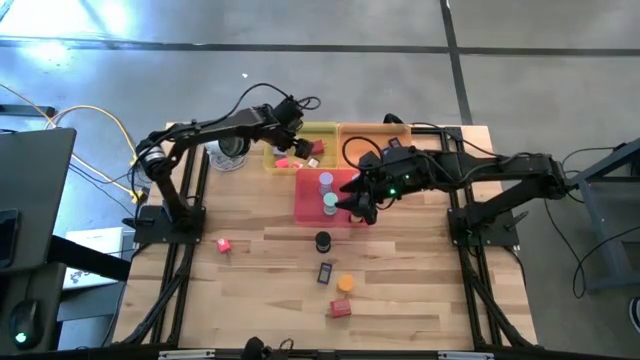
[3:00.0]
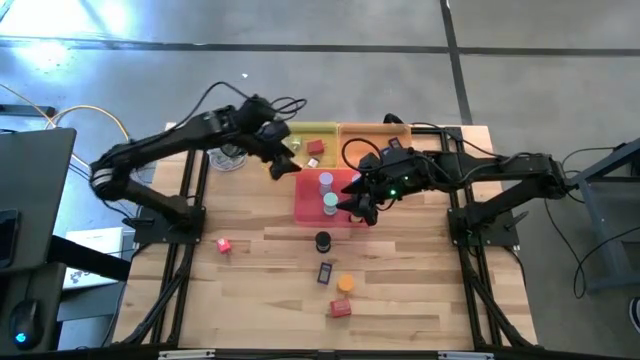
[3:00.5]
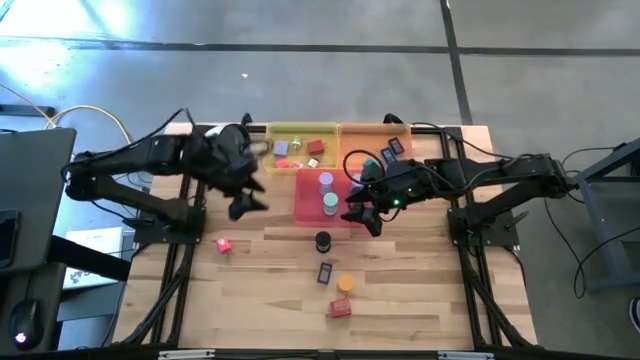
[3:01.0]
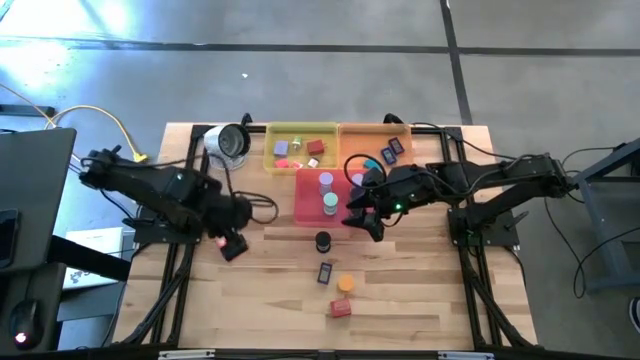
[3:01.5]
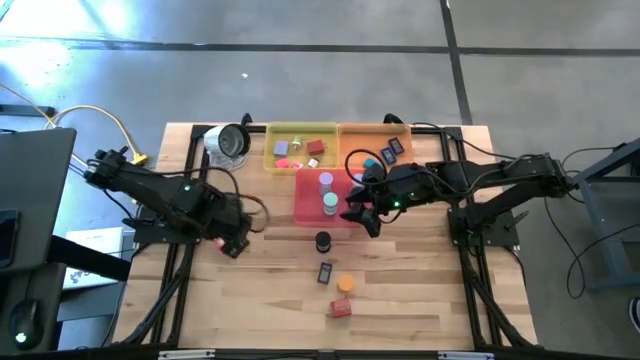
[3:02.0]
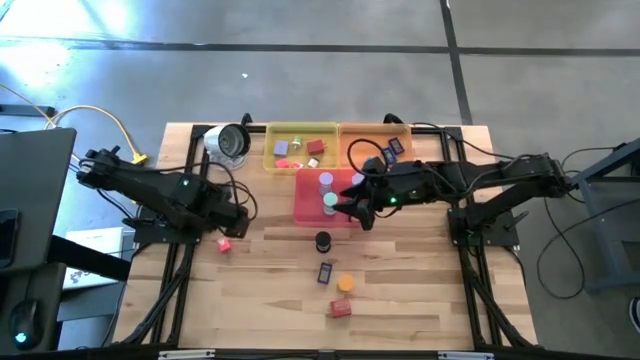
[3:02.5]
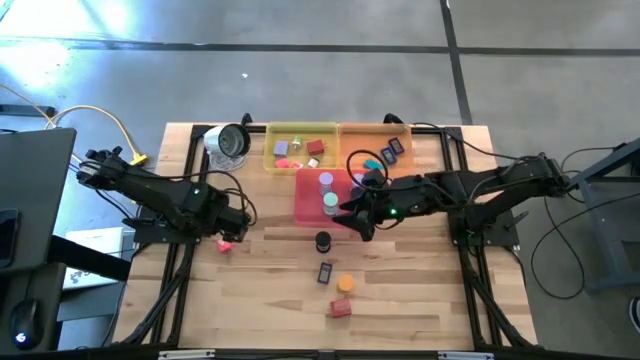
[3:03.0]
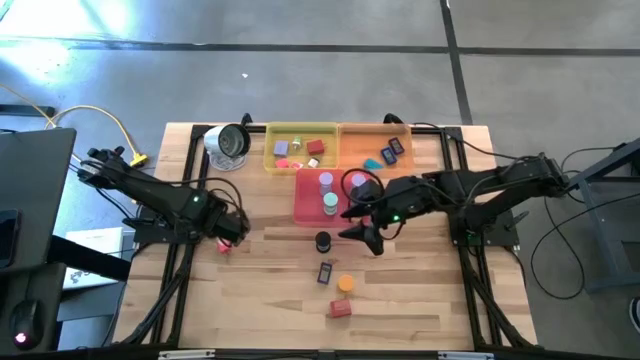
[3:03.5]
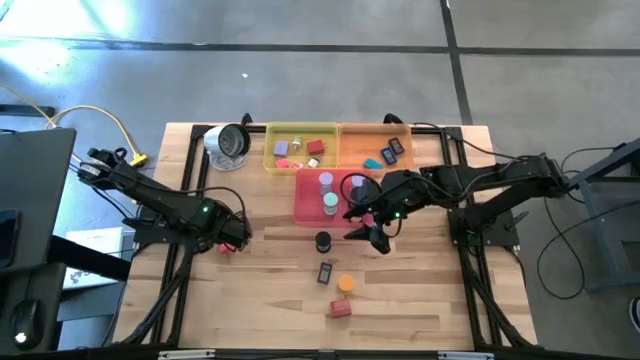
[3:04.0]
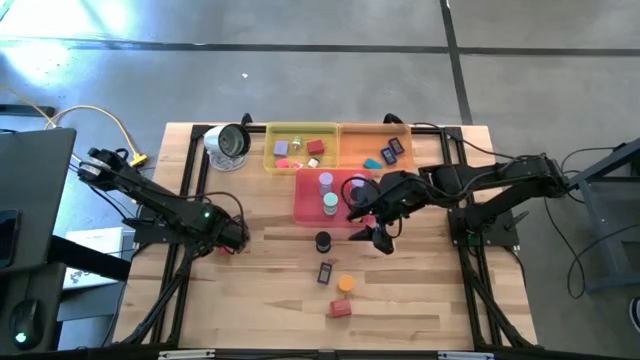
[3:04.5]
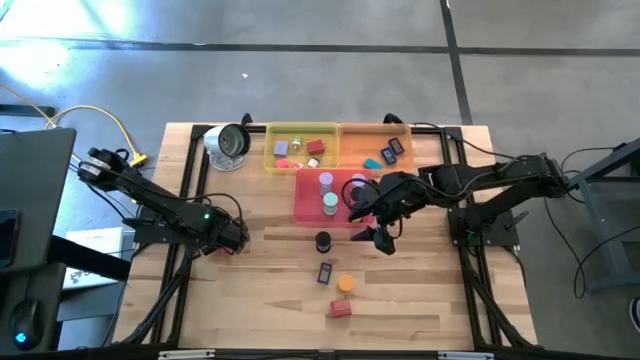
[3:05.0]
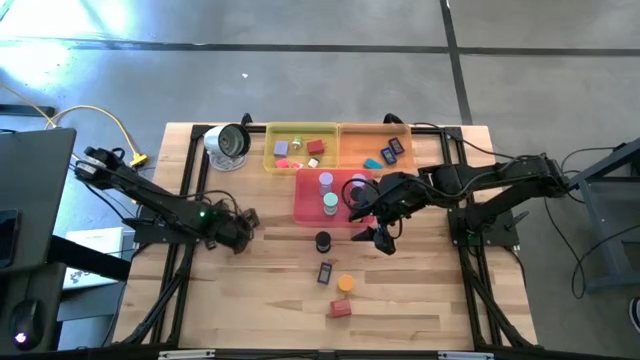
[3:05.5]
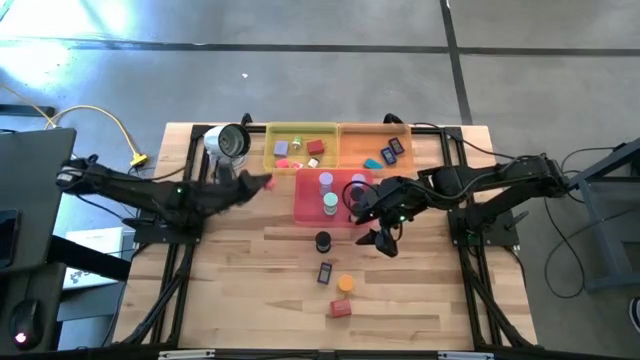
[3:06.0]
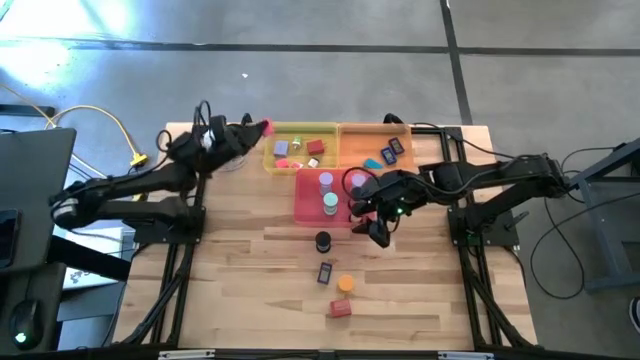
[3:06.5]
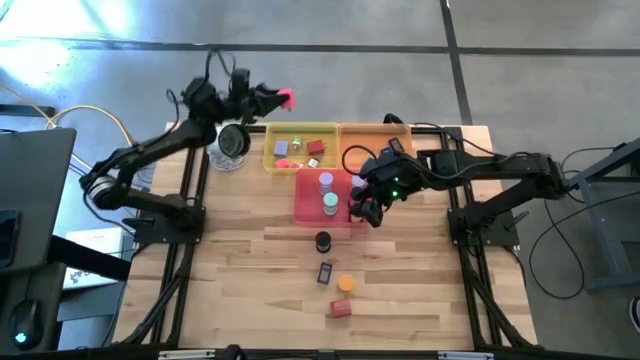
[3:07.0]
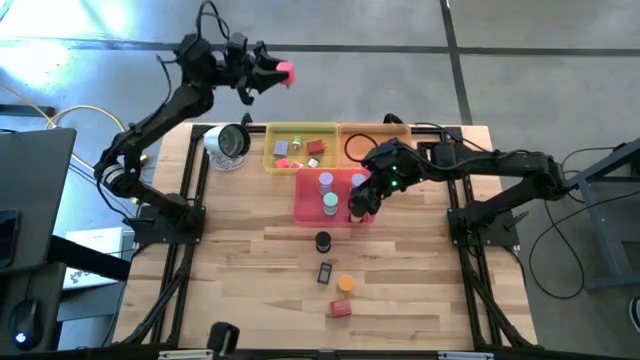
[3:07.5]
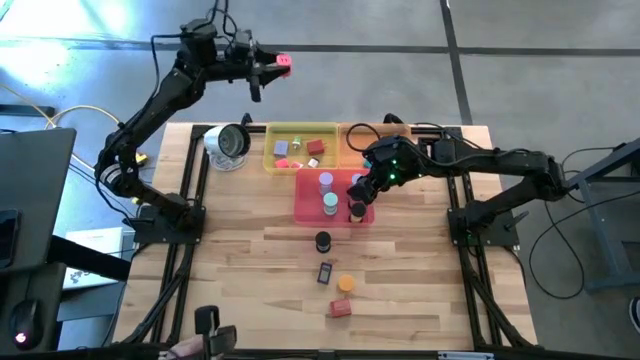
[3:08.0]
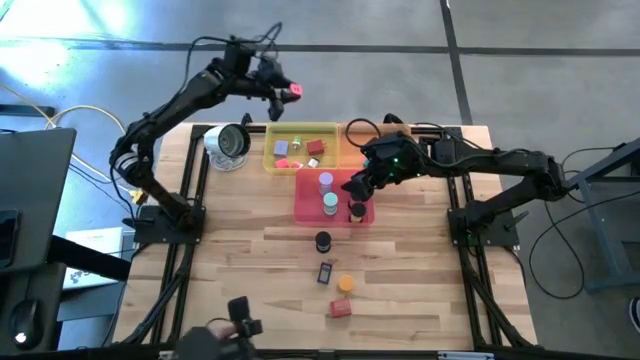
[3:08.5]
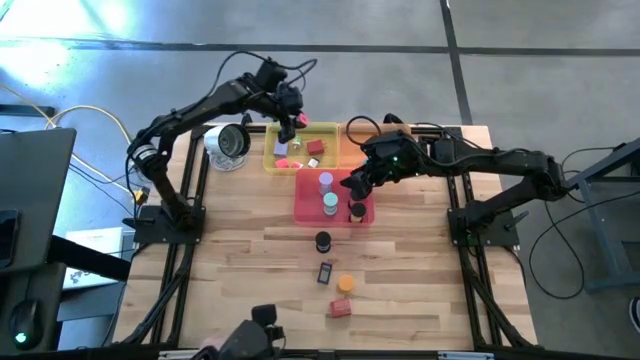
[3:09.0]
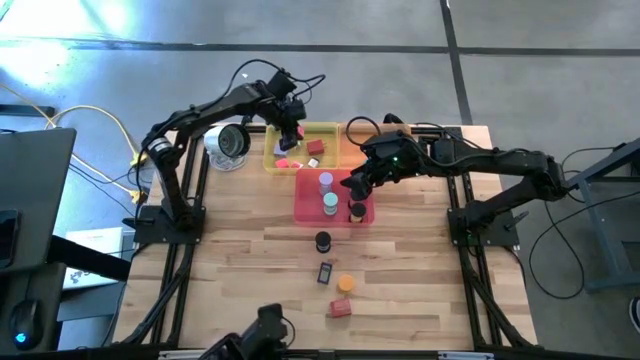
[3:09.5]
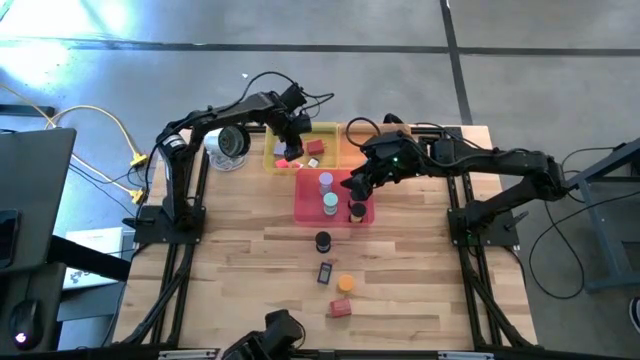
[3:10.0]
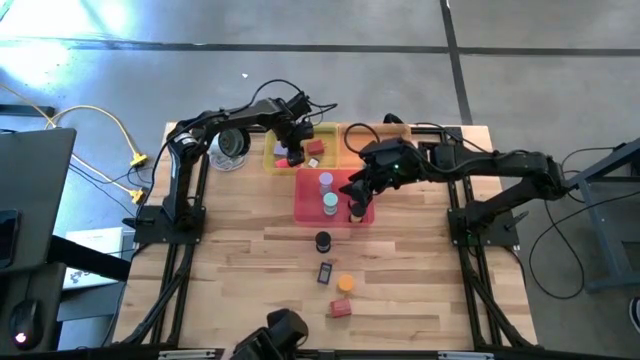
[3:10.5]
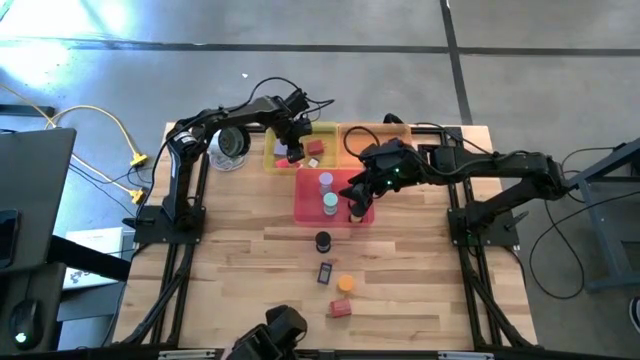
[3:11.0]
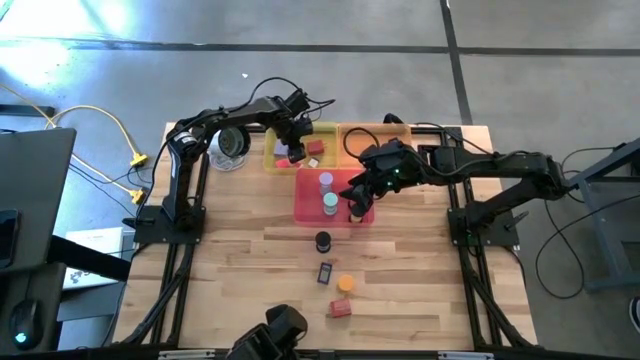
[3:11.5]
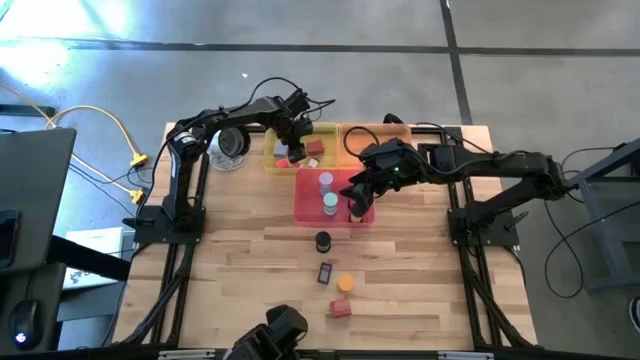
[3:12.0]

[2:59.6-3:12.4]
Task: Pick & Place Office items
Put the pink charger adapter into the yellow bin

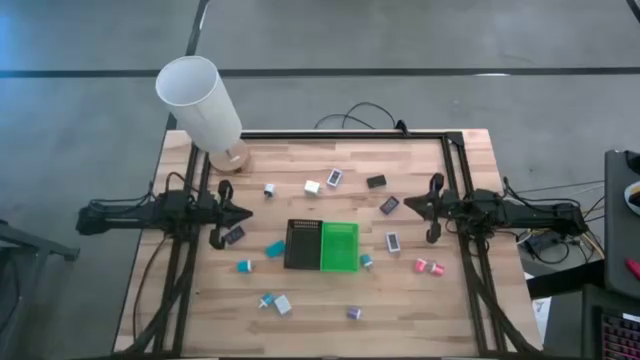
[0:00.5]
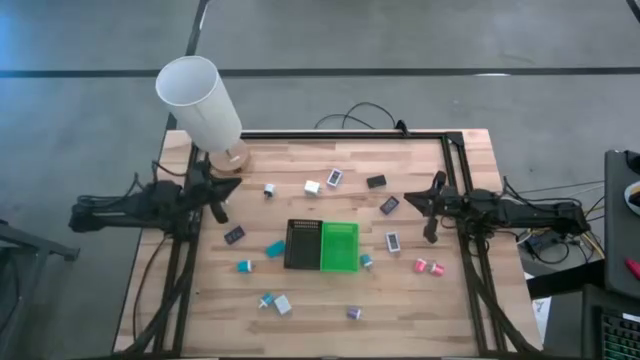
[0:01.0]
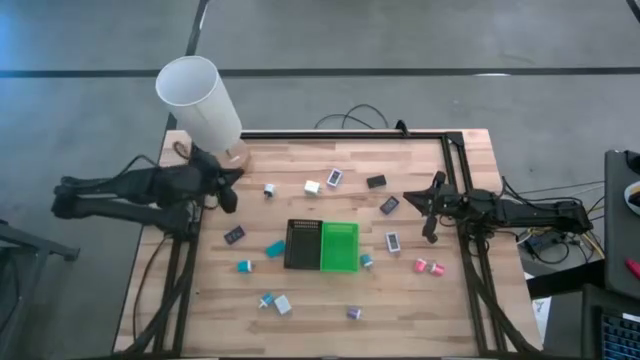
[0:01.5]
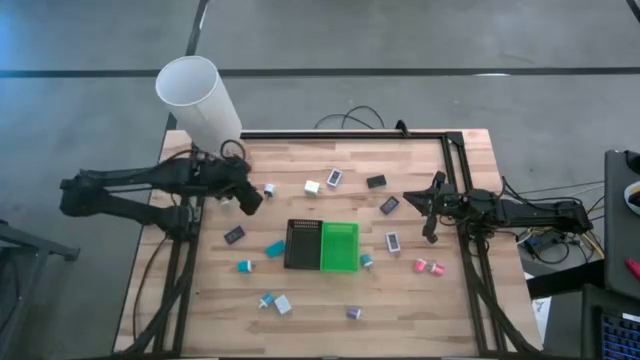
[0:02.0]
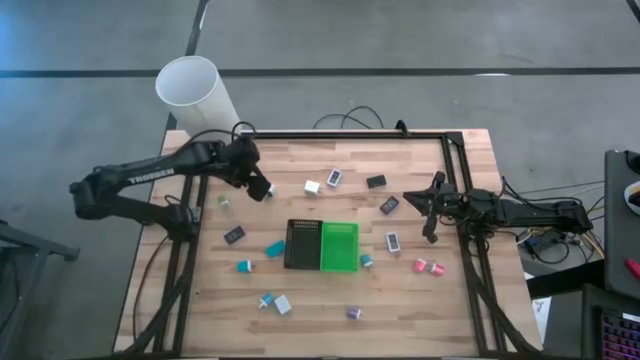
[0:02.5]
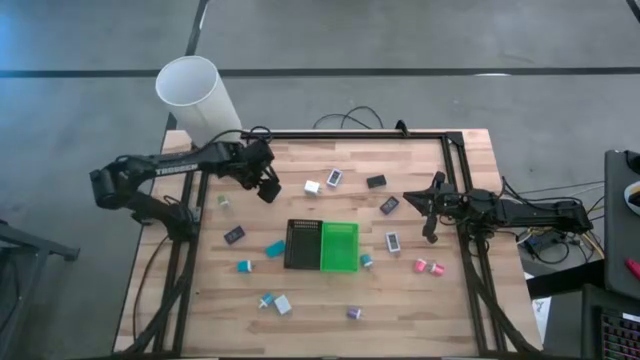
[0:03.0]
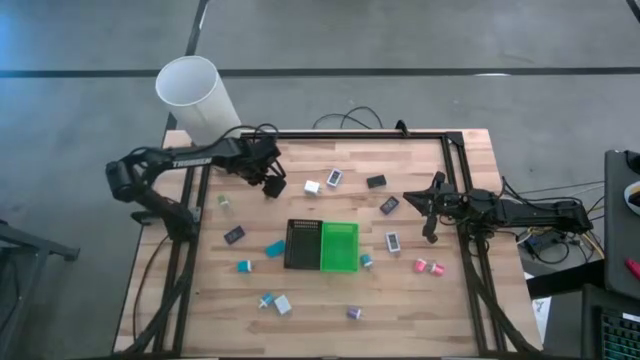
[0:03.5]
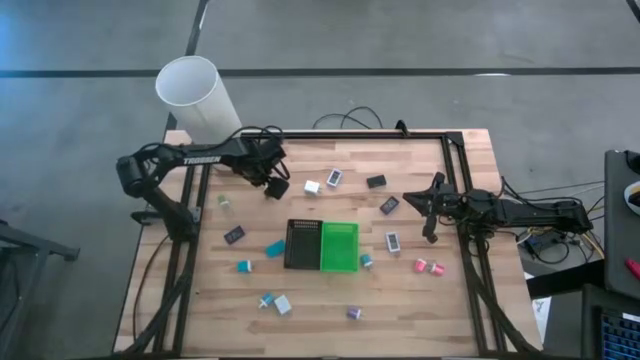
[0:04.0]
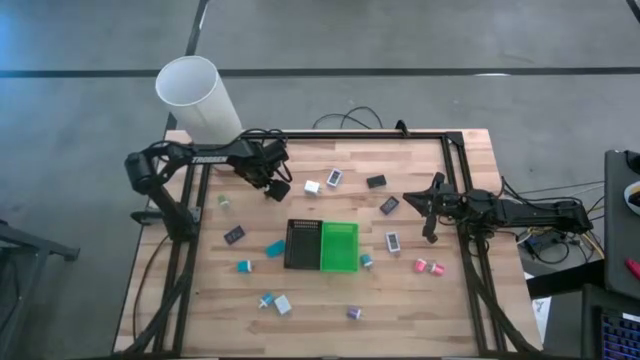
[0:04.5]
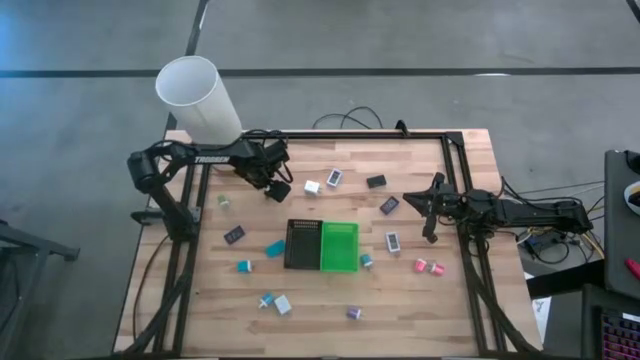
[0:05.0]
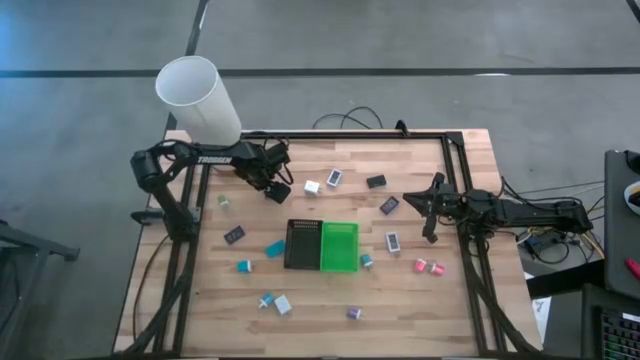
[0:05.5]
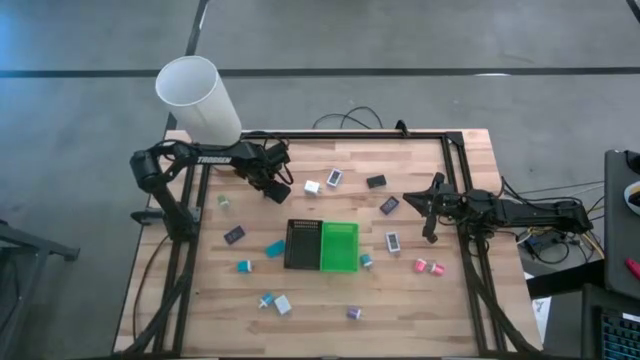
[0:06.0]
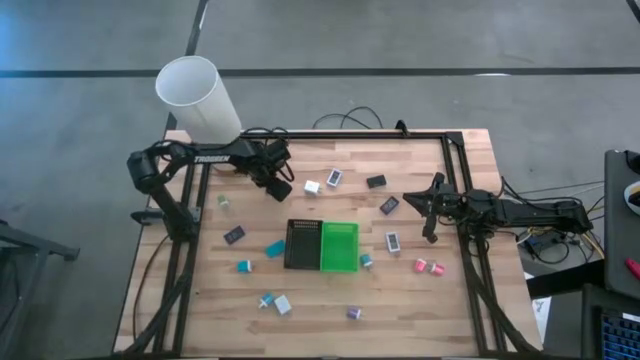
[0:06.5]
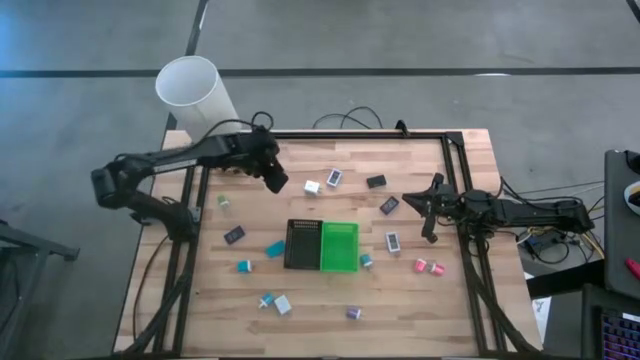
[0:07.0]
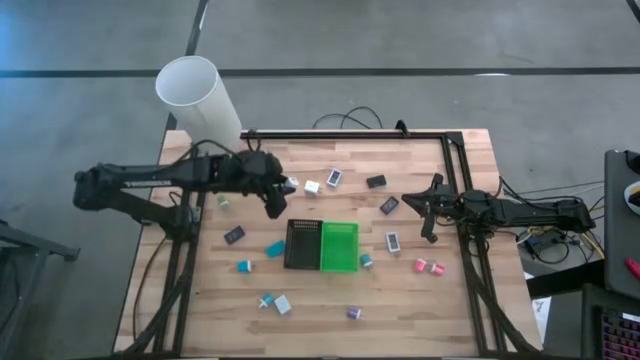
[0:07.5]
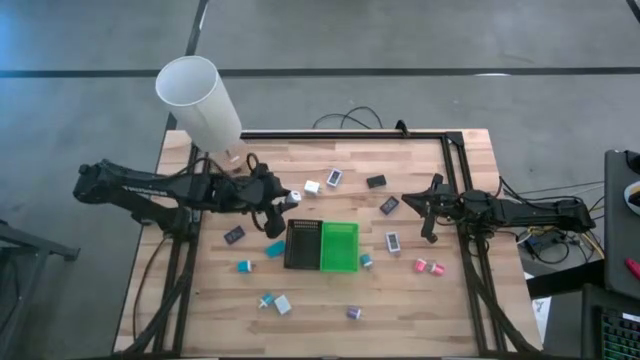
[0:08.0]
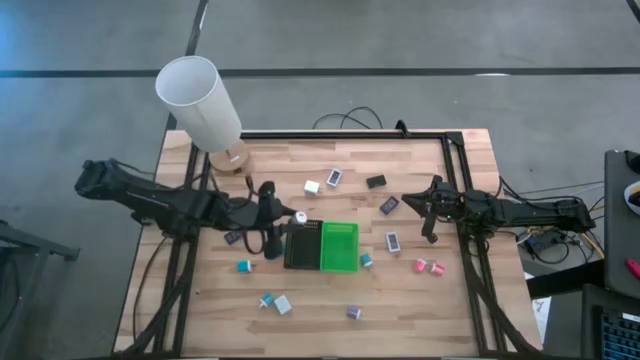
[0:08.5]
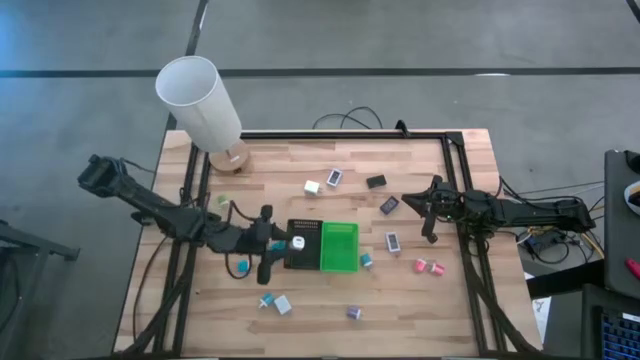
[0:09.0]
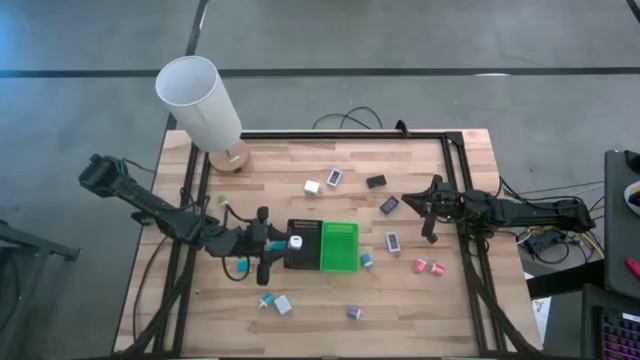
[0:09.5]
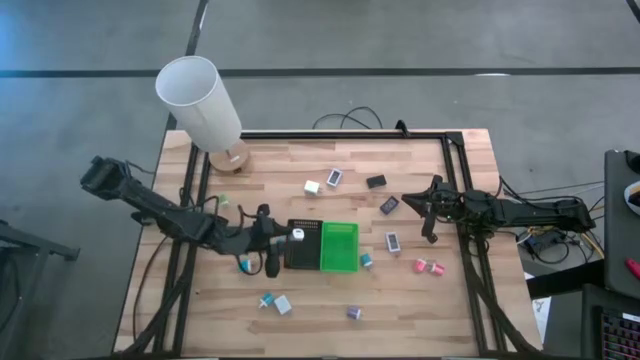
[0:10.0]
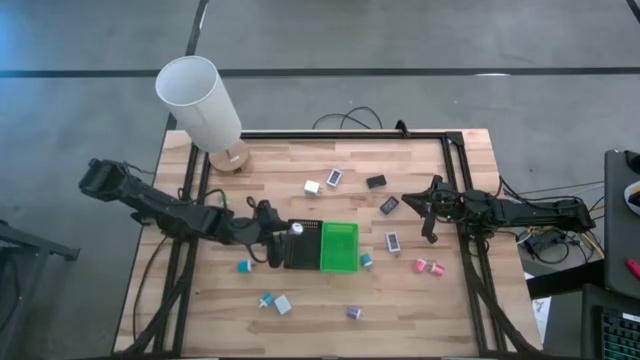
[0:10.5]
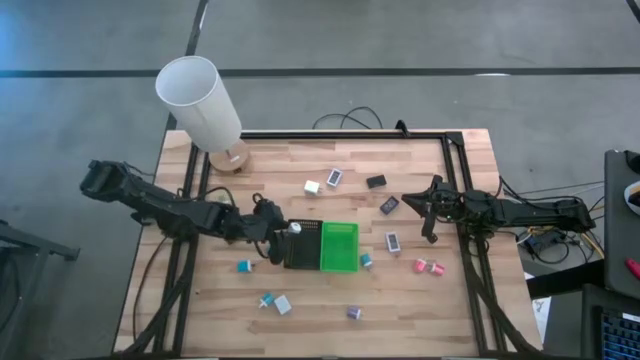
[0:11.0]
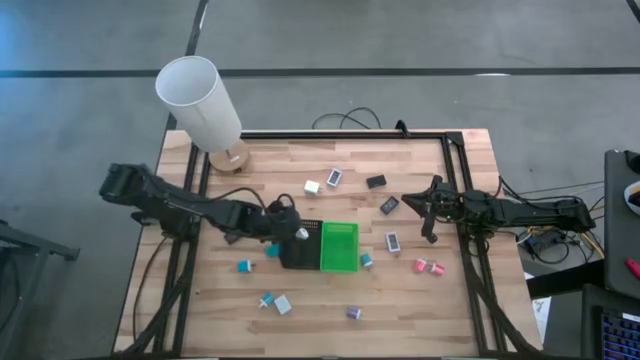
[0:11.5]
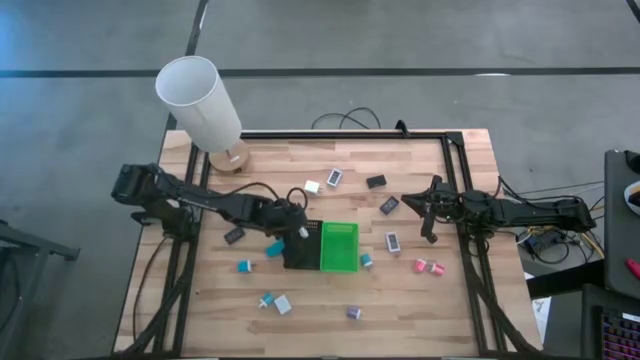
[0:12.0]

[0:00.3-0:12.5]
Task: Pick & Place Office items
Put the black white charger adapter into the black bin
